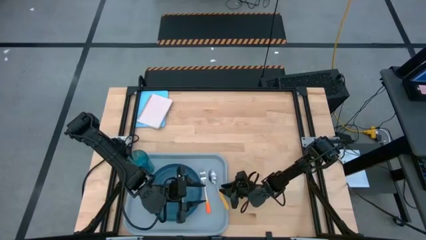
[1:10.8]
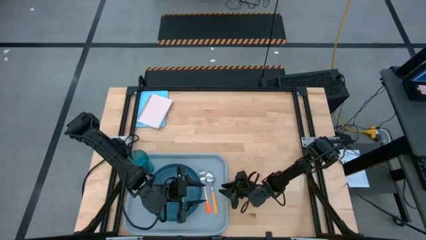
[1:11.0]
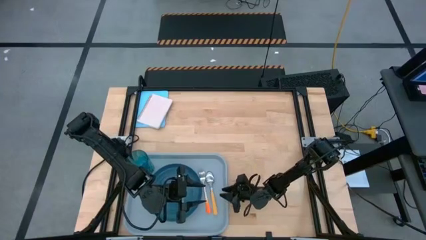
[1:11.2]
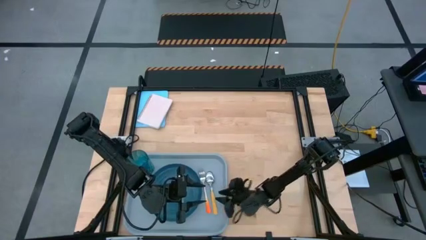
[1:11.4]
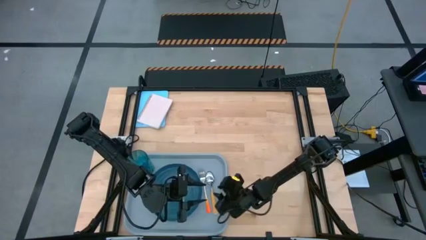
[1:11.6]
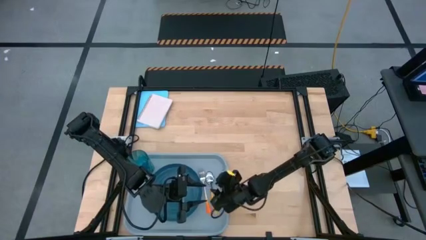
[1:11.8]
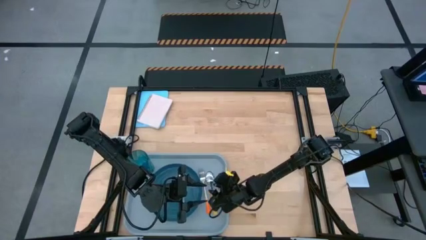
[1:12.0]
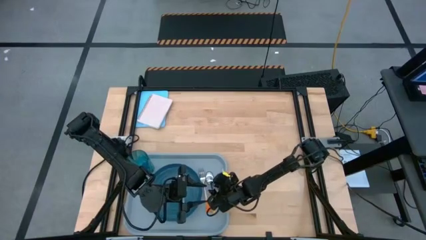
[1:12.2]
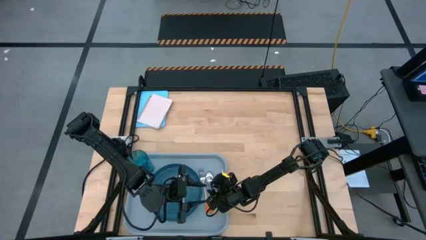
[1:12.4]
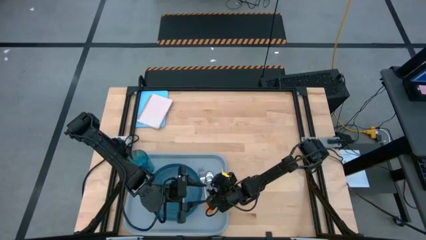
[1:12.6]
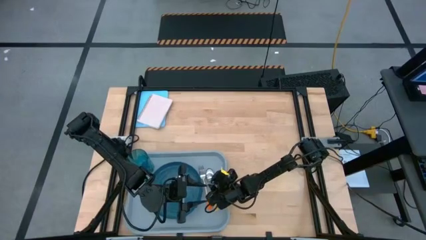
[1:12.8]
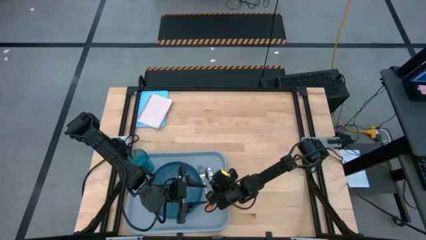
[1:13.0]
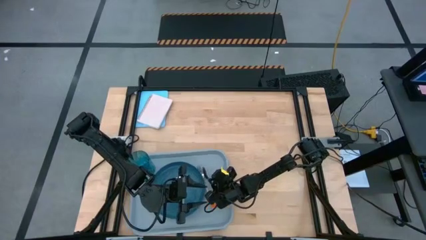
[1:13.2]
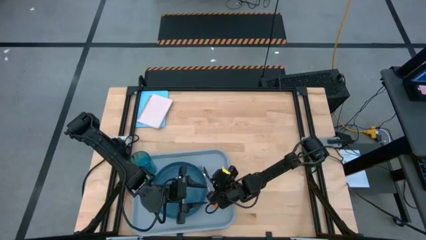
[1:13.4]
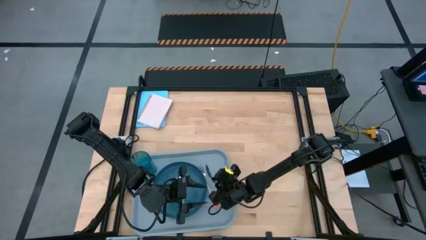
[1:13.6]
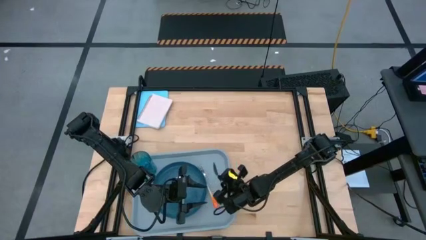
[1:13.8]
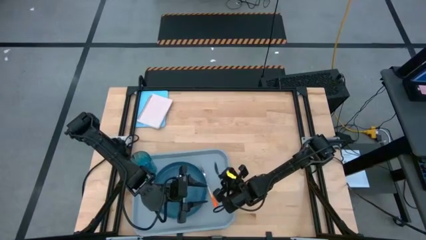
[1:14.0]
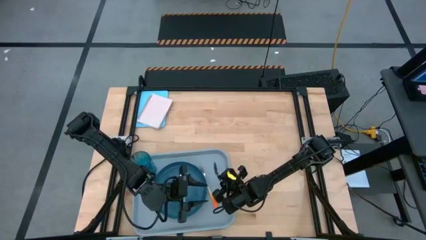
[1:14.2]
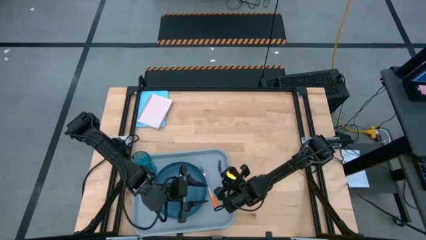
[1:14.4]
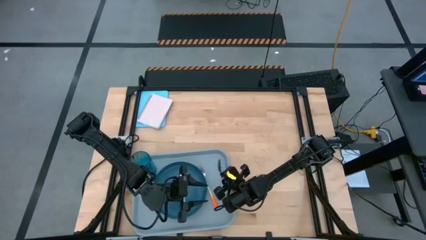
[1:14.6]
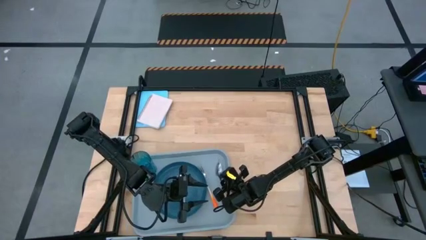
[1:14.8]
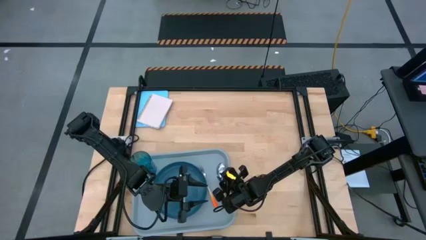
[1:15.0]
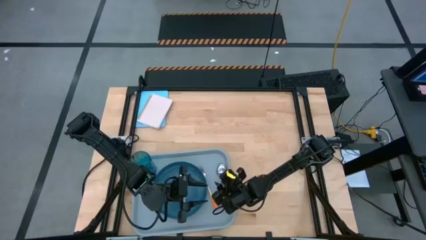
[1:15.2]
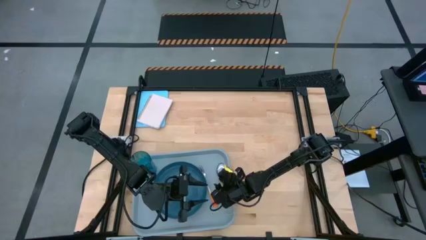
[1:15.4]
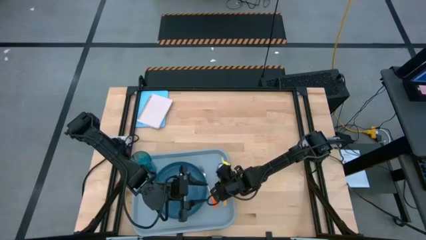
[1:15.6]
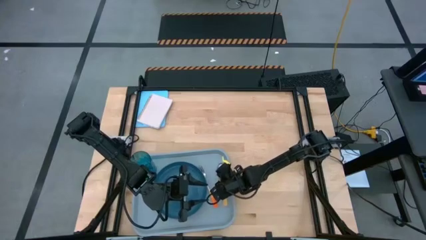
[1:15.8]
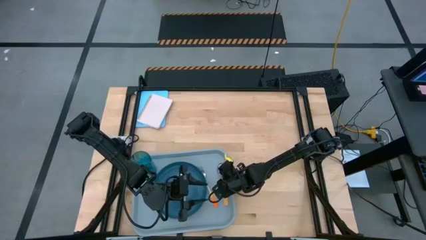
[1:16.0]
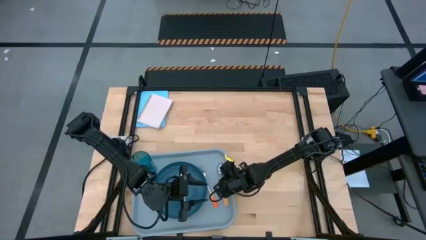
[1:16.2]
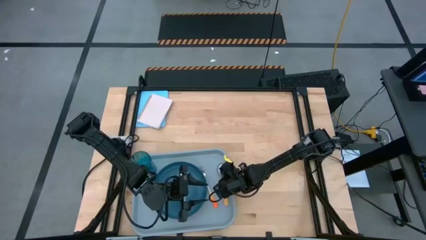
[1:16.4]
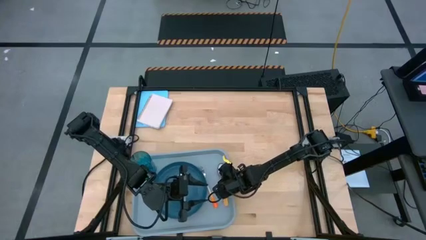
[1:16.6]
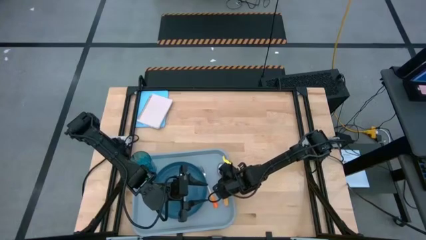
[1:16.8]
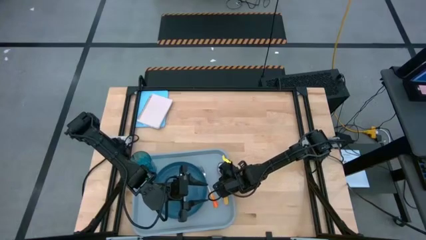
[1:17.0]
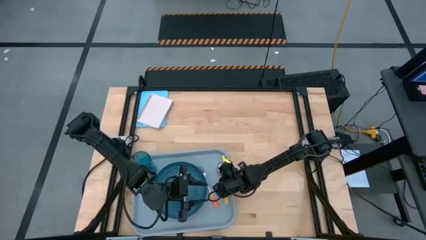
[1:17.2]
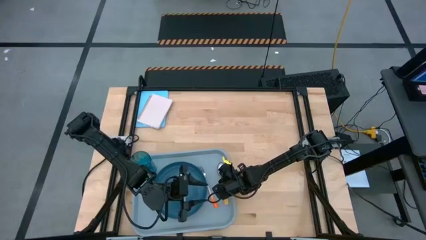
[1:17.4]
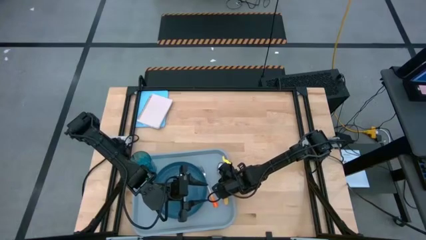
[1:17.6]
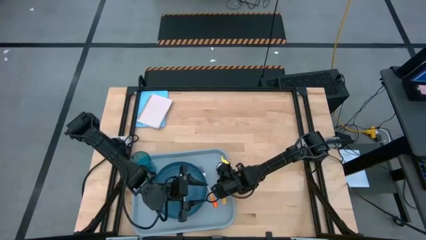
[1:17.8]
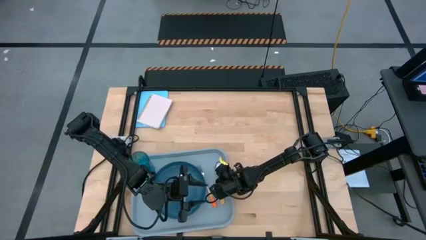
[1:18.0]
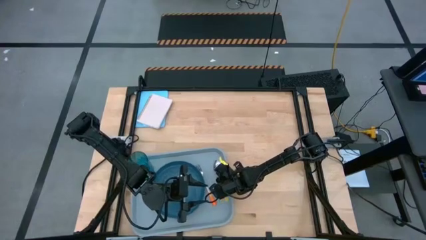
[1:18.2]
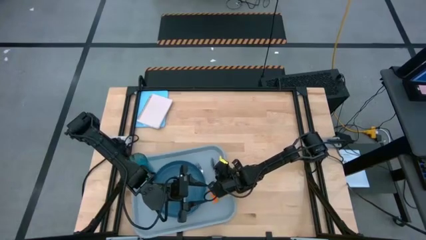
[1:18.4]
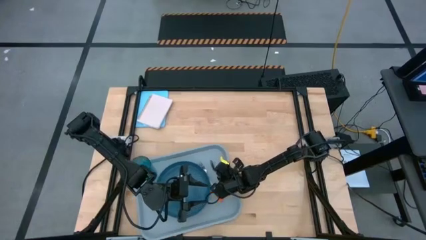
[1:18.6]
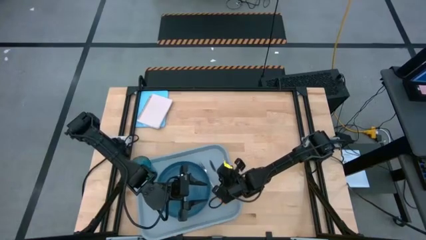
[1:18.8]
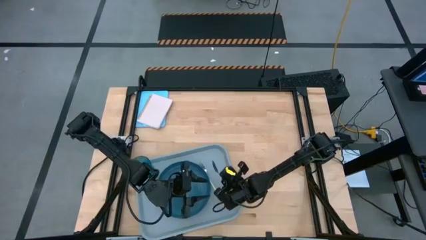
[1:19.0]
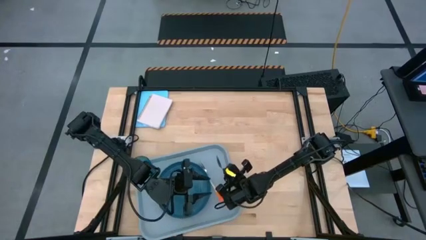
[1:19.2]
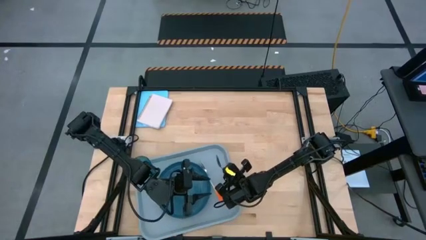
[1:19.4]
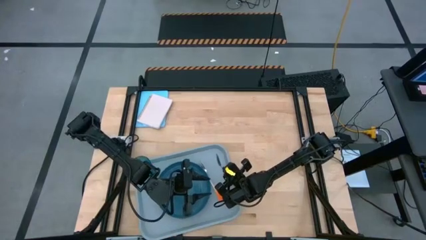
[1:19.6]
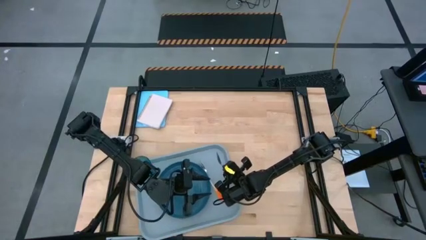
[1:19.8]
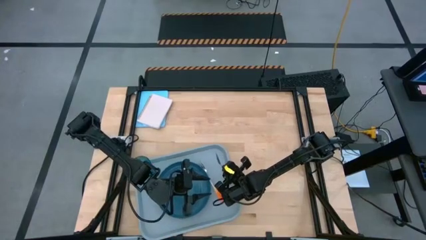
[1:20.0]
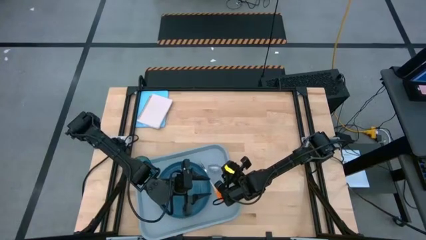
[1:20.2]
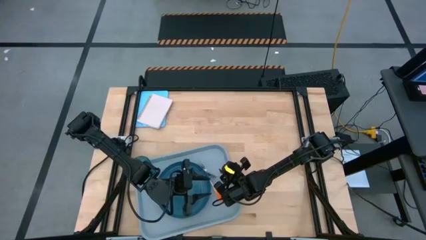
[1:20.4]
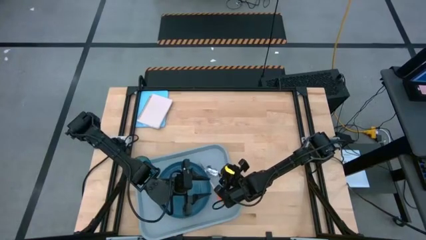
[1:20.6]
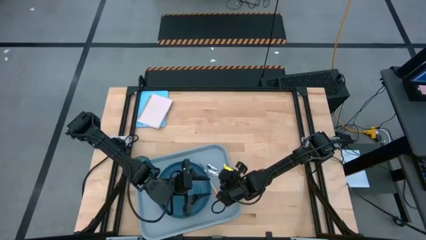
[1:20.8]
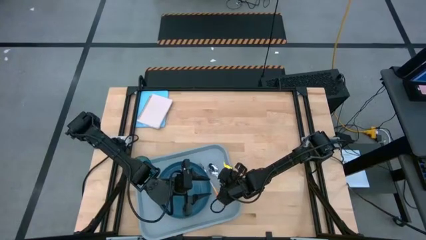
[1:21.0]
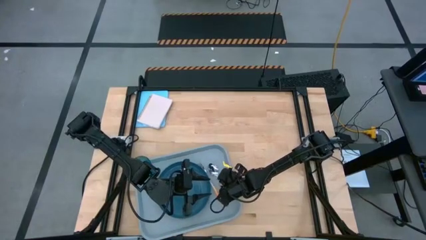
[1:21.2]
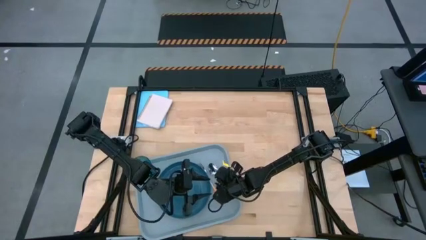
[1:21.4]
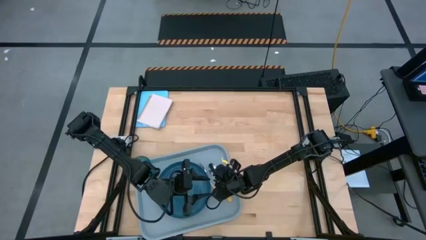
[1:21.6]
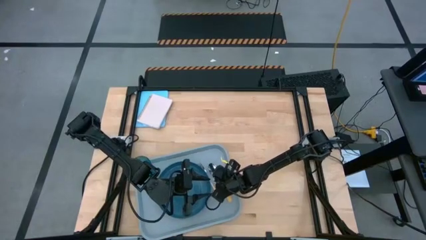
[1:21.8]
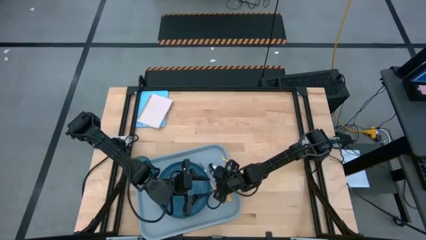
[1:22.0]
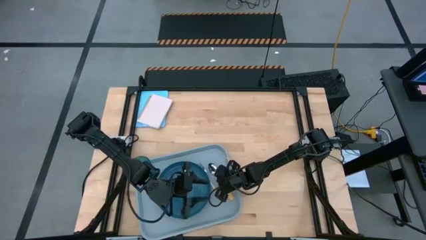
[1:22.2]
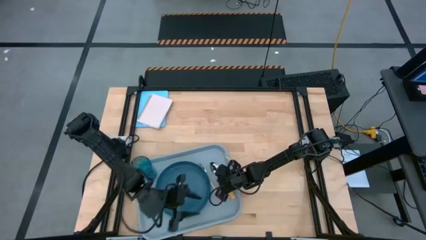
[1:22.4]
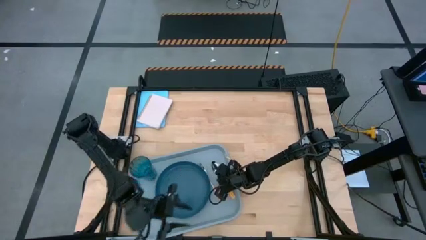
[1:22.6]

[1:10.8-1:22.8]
Task: Pick and place plate/cup/fork/spoon on tray
Put the yellow spoon on the gray tray to the right of the orange fork

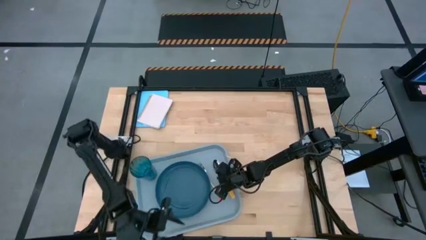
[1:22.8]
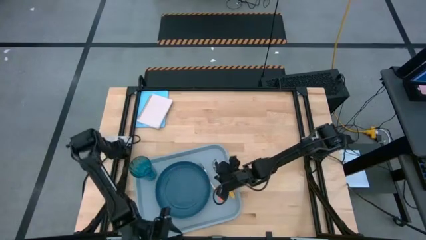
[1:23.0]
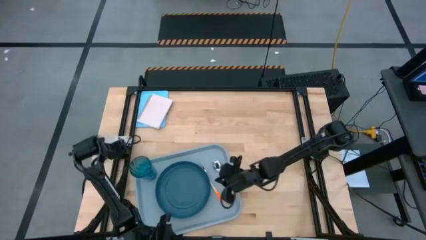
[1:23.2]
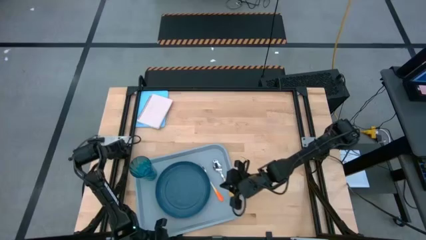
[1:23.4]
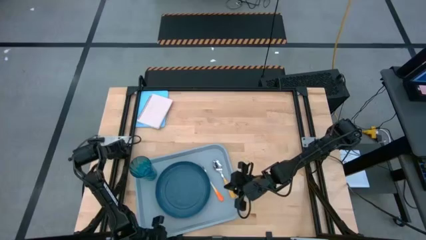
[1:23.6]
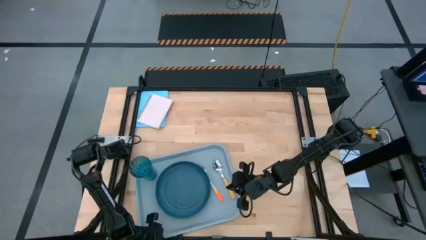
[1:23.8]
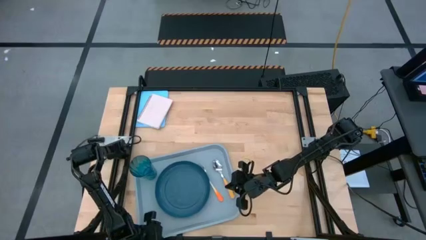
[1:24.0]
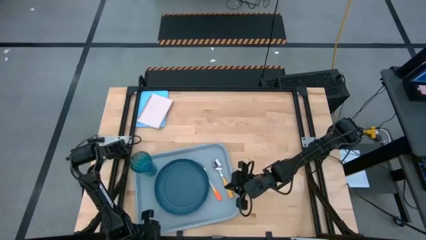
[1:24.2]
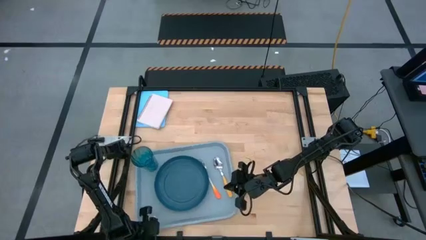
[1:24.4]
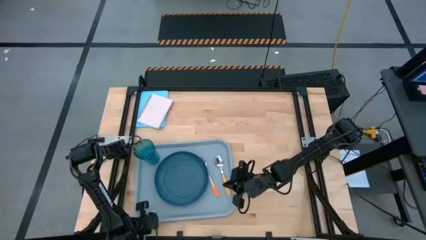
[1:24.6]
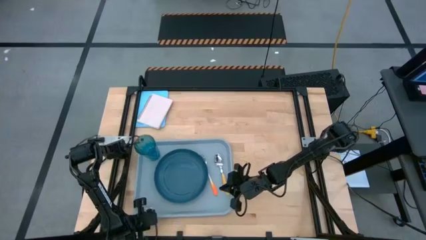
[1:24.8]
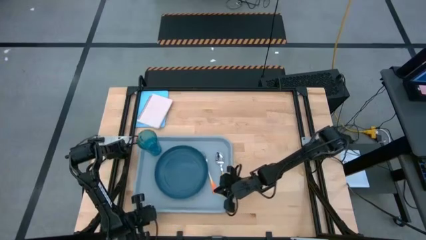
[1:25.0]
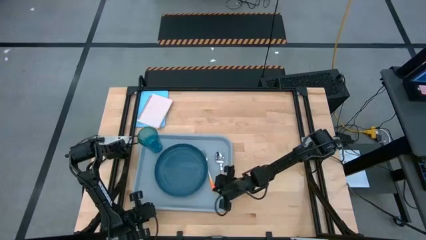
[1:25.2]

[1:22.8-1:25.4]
Adjust the gray tray

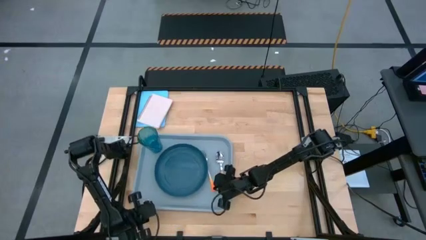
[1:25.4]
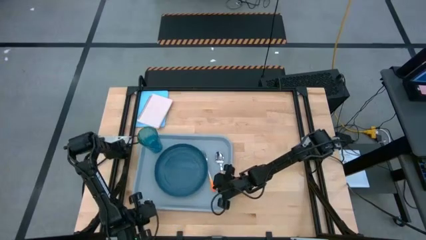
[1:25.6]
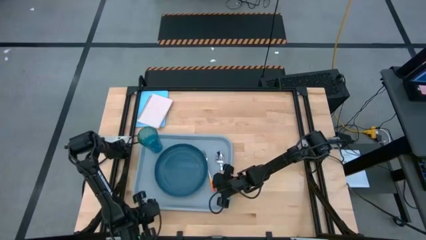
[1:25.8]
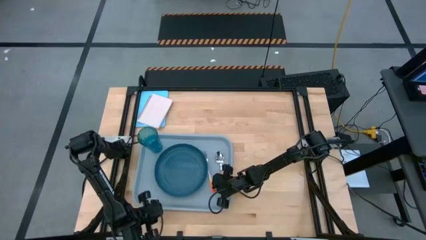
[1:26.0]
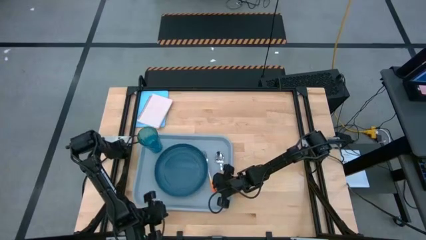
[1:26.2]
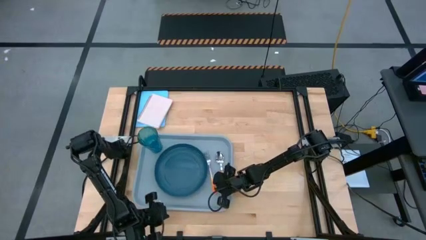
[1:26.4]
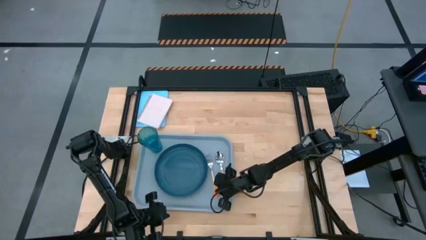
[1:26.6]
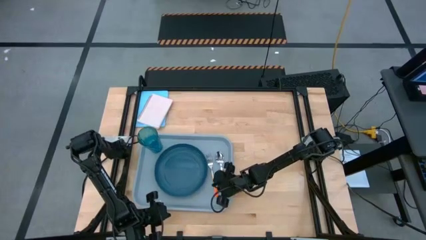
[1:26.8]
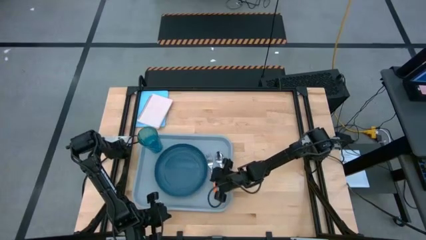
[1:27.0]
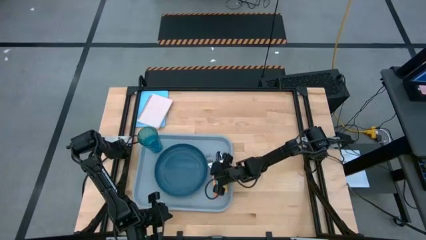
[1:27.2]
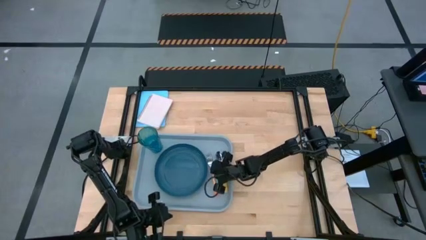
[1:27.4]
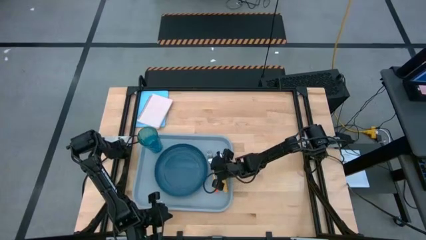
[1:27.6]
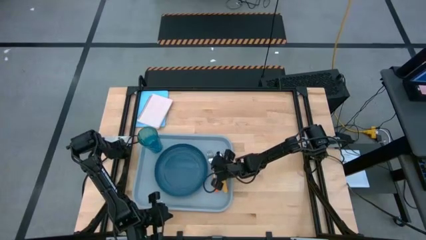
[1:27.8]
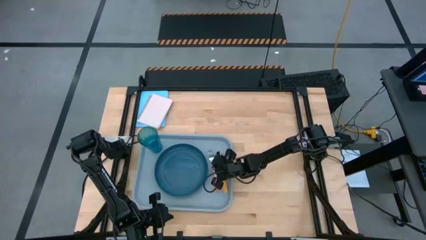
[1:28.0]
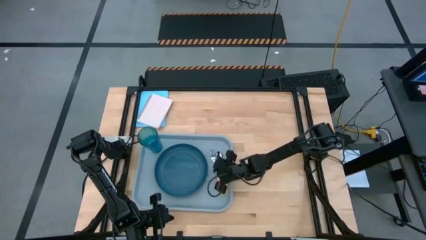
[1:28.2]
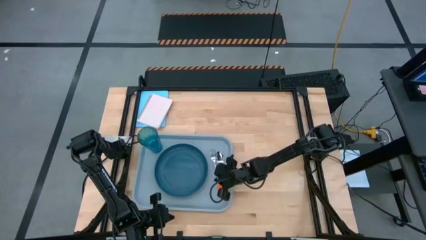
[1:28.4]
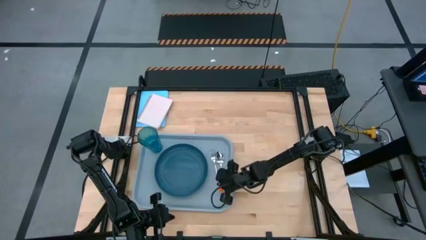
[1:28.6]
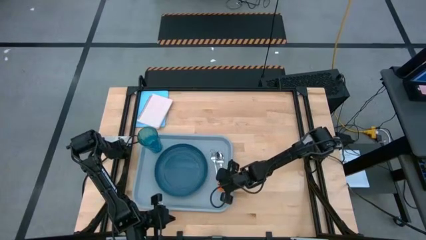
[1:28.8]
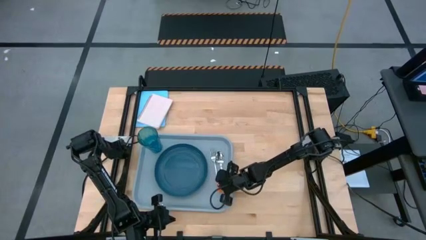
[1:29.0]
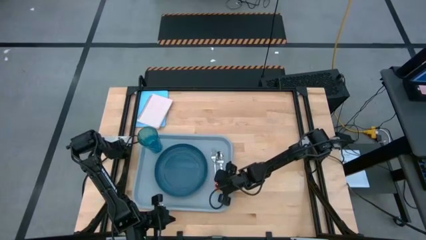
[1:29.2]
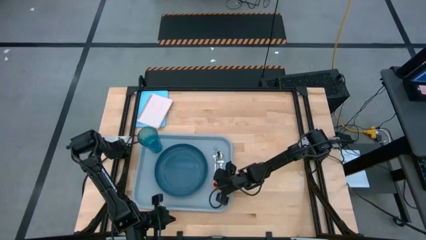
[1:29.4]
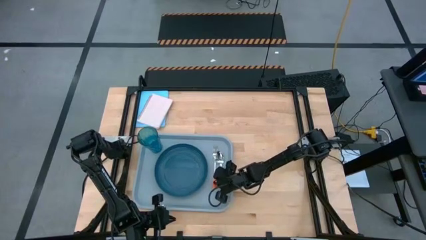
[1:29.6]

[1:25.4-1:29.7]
Adjust the orange fork on the gray tray
